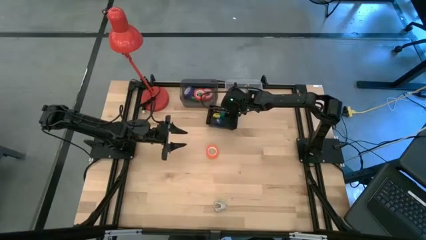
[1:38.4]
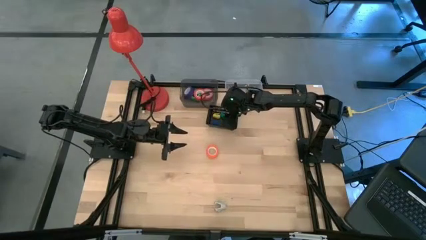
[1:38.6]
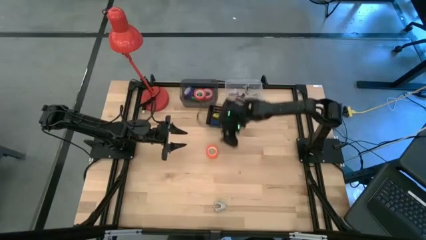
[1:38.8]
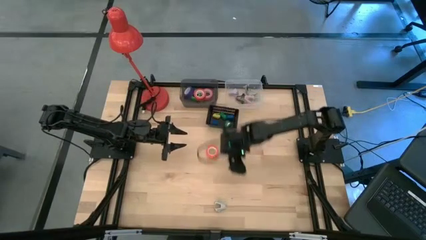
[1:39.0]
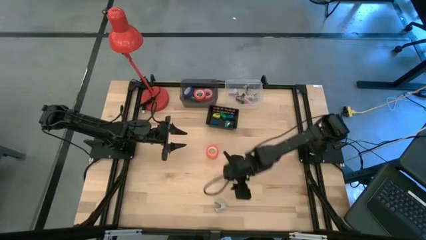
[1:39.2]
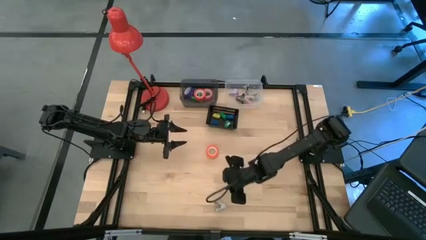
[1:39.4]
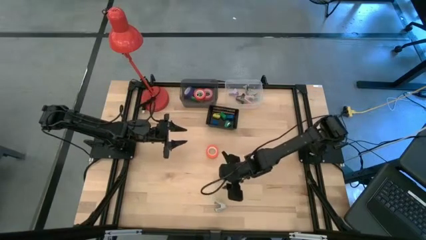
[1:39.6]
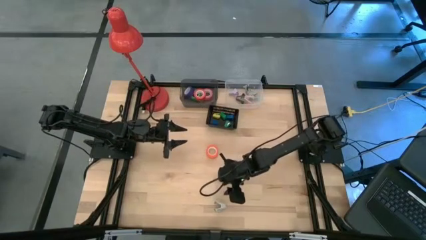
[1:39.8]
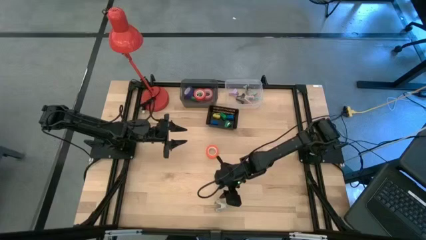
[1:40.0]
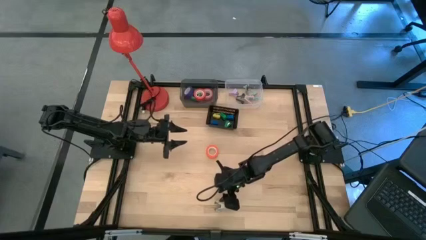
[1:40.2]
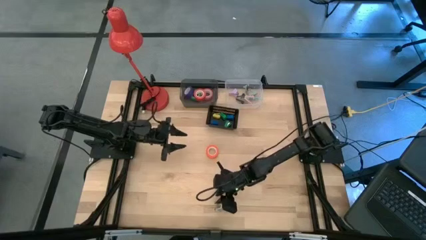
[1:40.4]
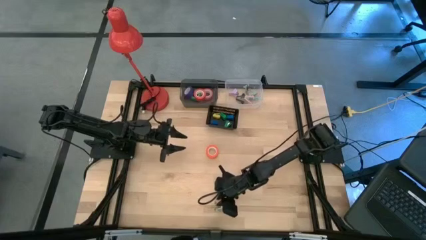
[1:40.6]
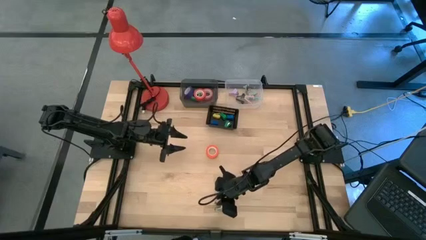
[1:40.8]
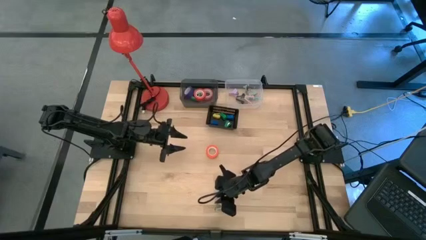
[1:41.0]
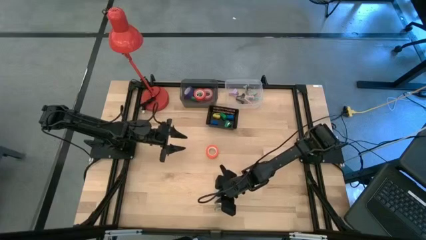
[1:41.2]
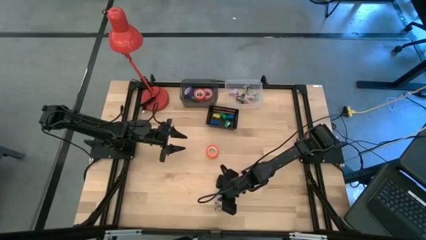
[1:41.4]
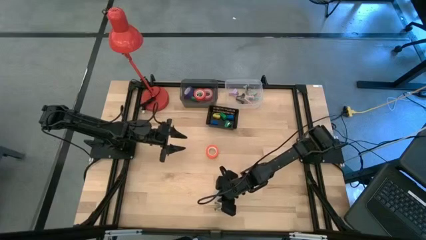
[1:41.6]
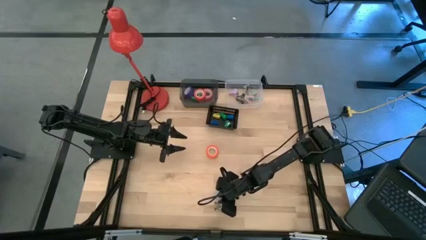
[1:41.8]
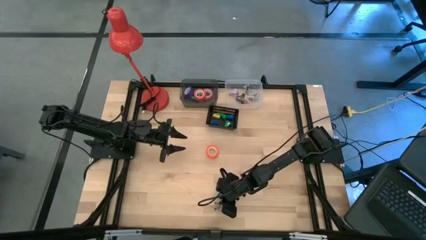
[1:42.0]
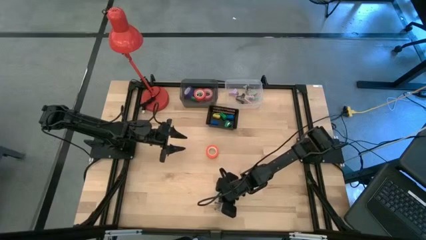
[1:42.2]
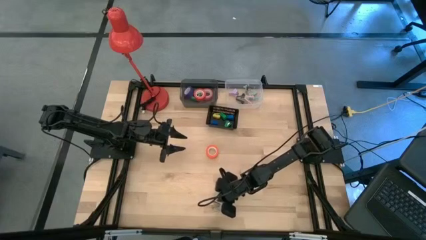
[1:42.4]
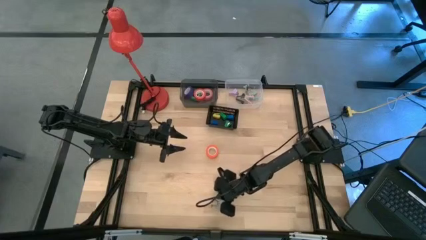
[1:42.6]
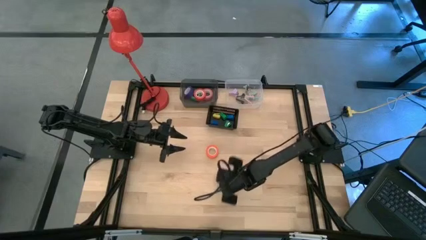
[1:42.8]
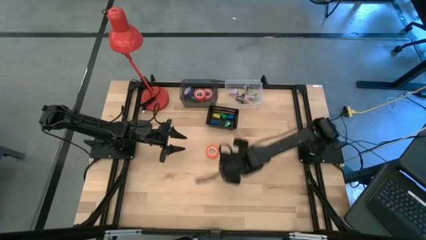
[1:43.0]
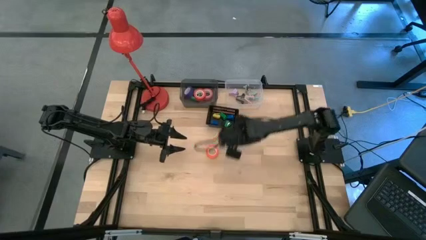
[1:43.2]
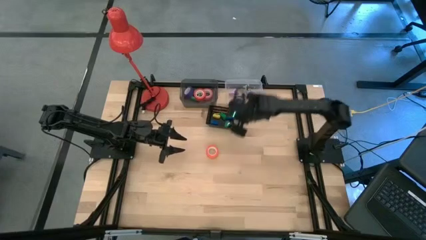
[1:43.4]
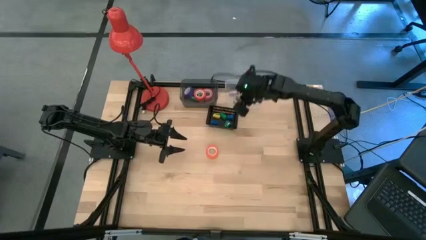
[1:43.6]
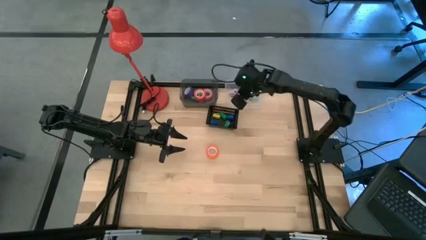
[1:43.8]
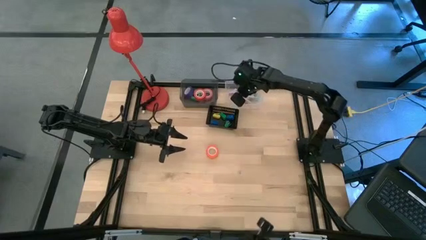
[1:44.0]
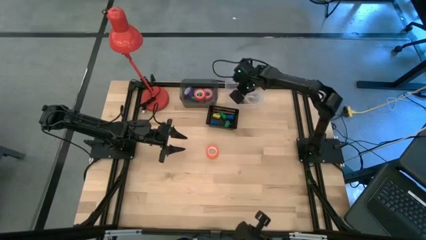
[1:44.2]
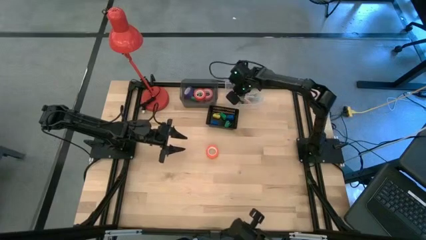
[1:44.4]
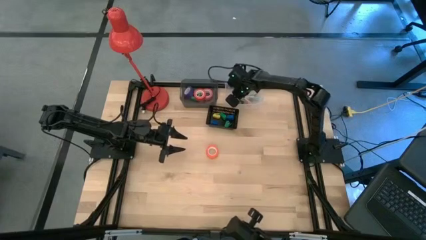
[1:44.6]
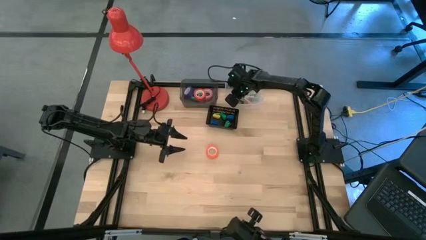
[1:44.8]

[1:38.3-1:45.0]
Task: Pick and place Stapler, Stapler remover, tape
Put the gray staple remover into the transparent bin

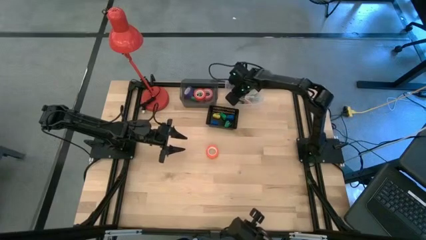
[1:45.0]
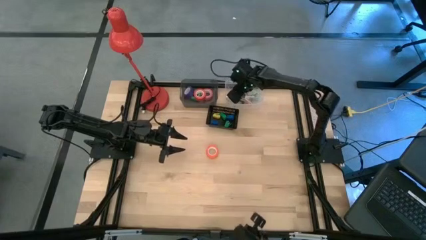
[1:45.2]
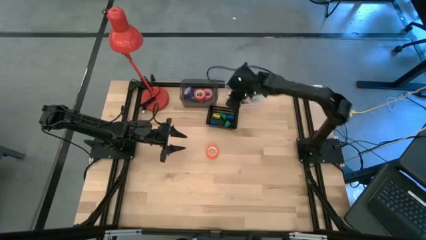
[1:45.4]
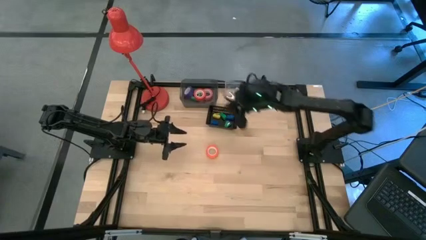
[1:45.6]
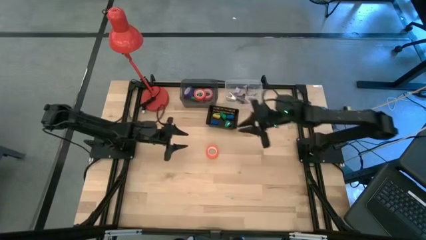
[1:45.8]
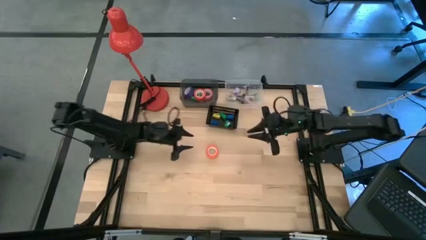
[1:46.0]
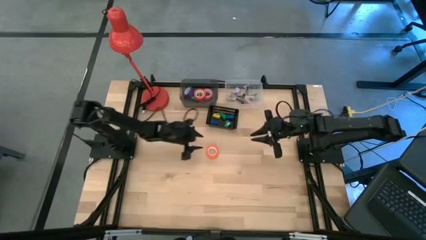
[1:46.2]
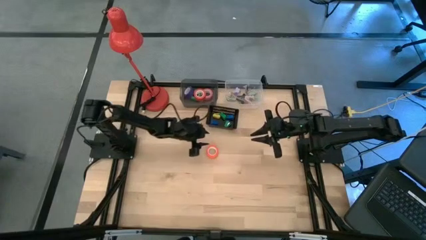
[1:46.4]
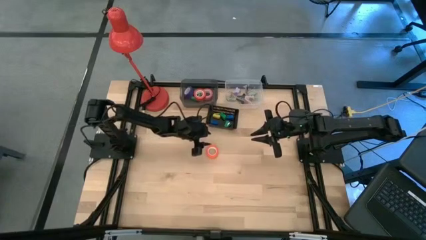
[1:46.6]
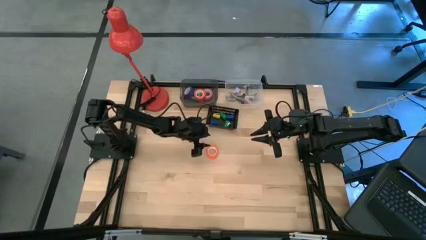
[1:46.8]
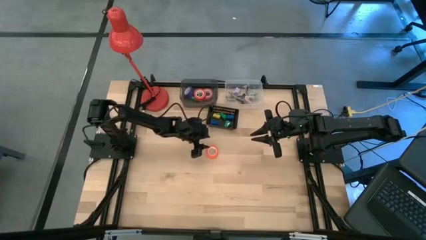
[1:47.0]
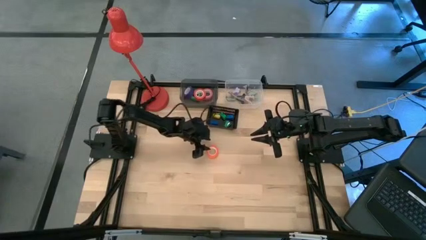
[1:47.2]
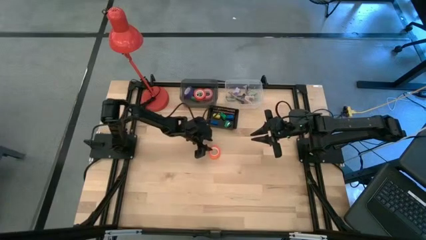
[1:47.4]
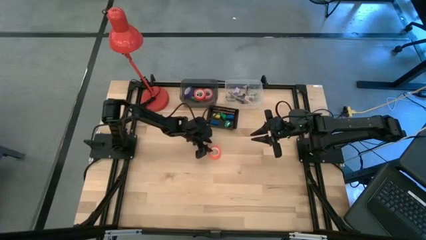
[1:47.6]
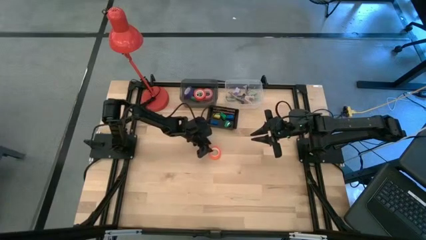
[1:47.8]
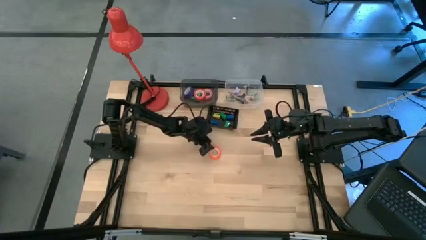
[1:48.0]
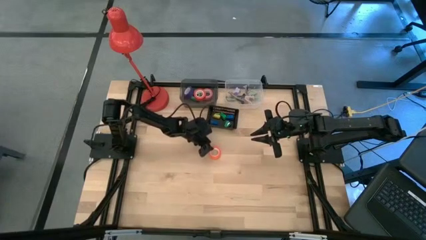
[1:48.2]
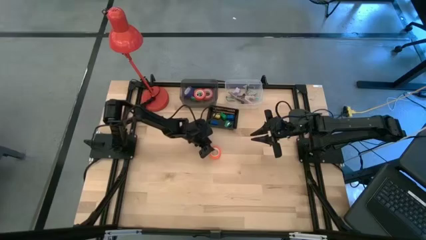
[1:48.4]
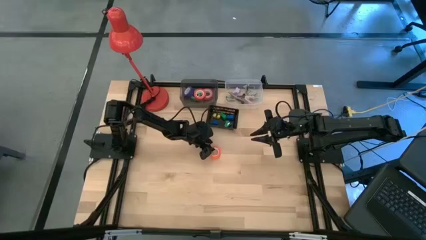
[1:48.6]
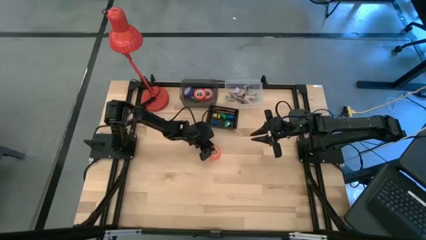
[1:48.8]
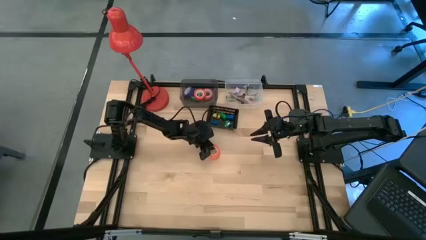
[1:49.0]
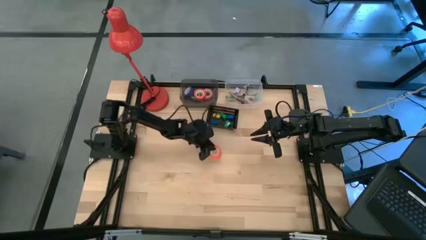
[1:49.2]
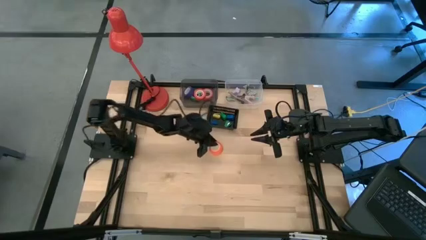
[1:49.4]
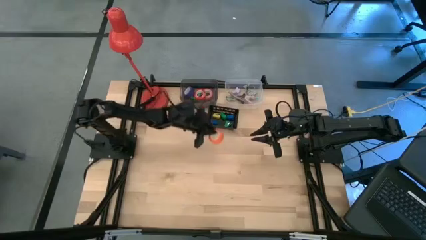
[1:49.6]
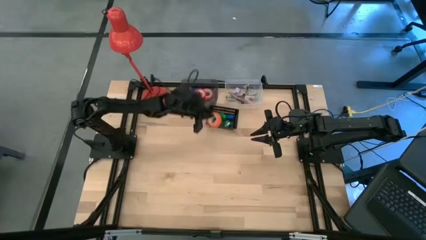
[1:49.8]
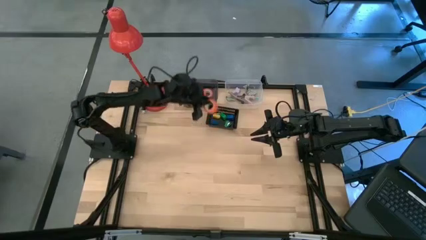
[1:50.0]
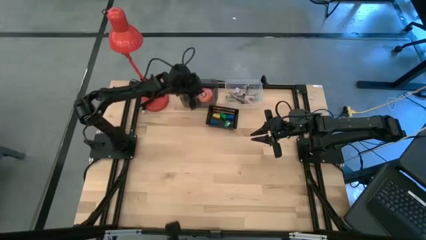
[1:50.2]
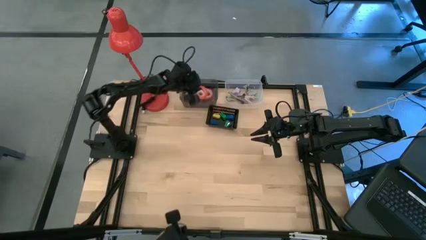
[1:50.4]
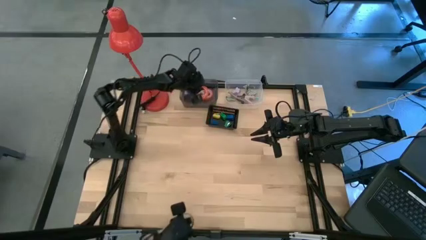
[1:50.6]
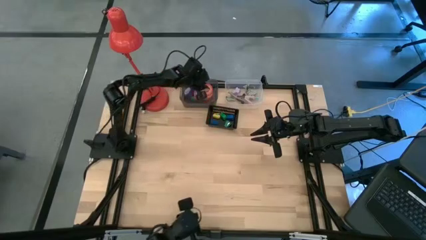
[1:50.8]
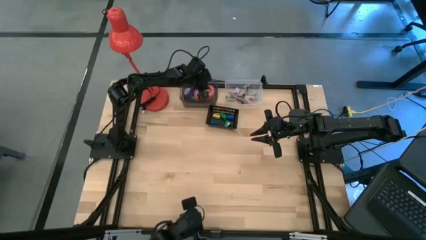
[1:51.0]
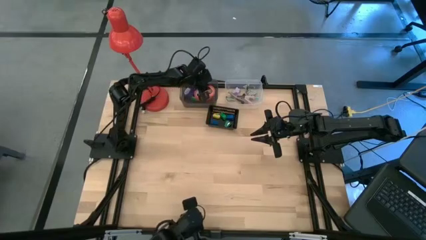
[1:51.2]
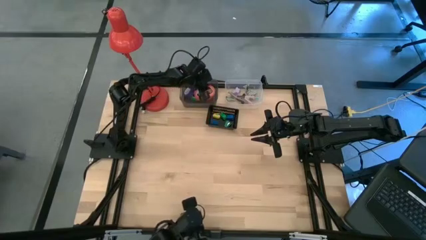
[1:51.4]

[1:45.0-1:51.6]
Put the orange tape into the black transparent bin

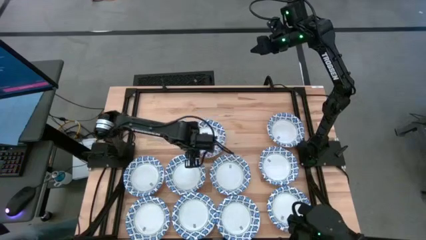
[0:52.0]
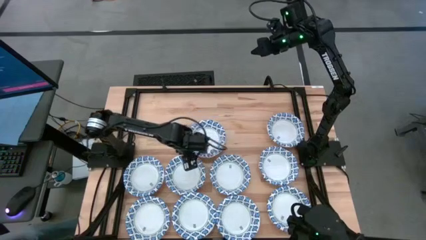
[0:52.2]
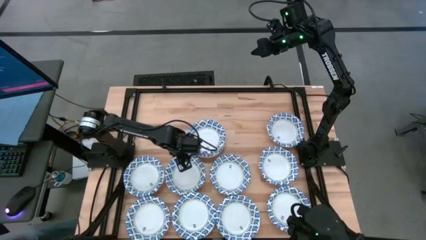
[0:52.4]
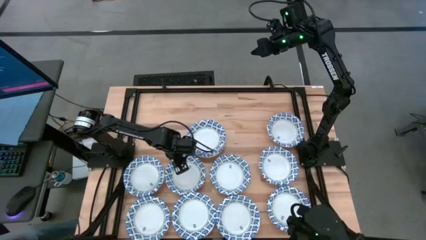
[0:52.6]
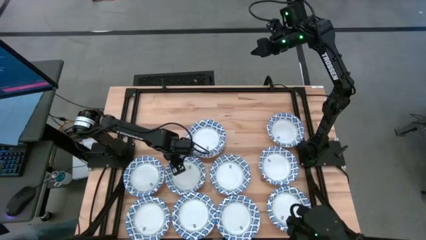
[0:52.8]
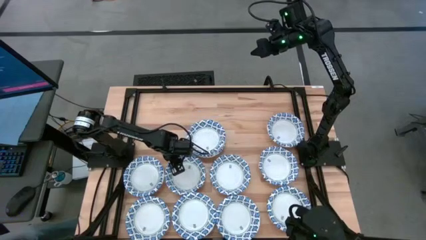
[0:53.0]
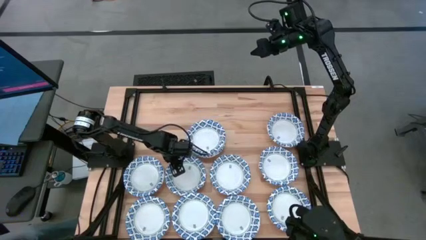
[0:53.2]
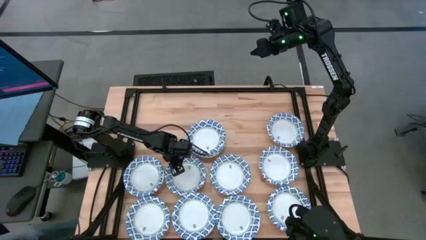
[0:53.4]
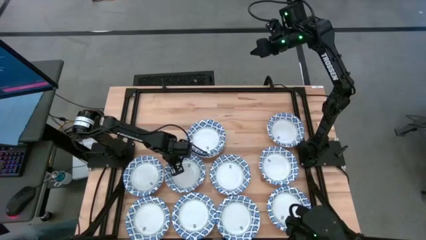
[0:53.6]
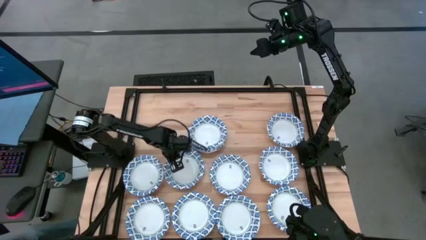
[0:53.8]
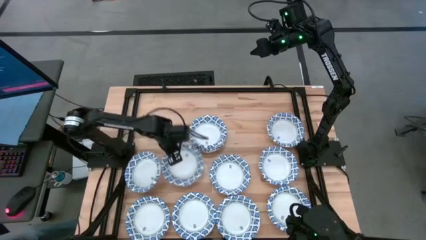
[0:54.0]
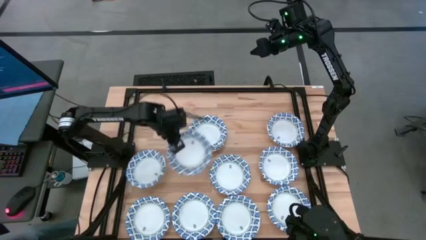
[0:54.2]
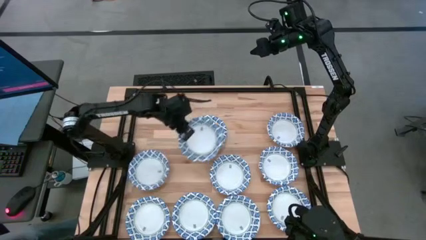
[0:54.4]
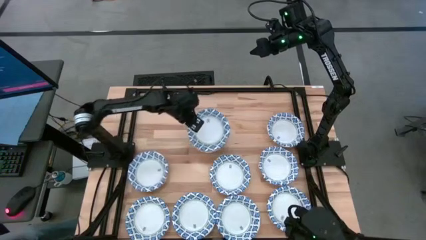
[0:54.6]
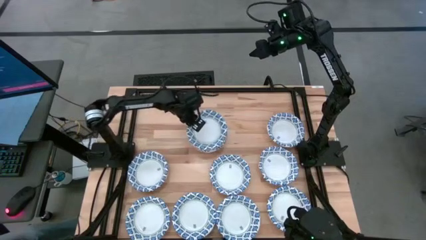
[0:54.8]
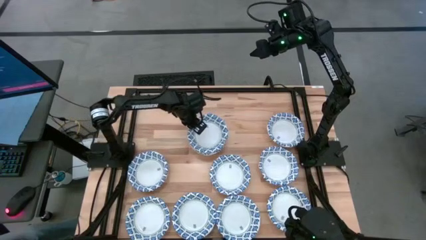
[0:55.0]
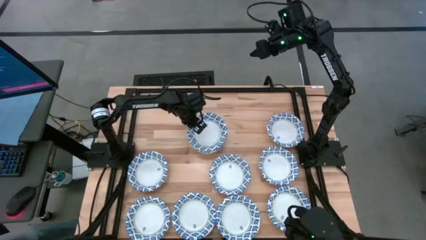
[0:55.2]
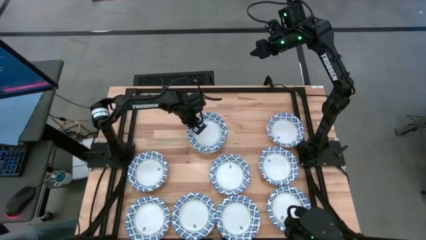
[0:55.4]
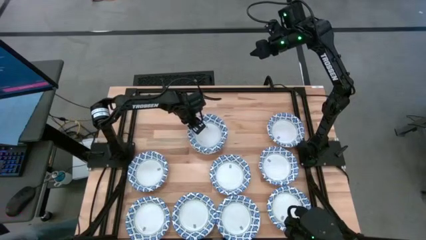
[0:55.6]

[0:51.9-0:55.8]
Task: Nest bowls inside each other
Stack the blue bowl on top of the blue bowls

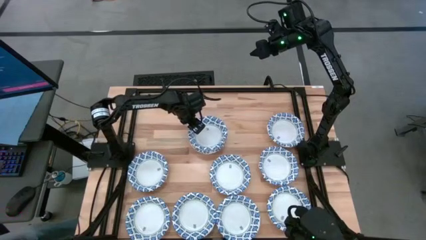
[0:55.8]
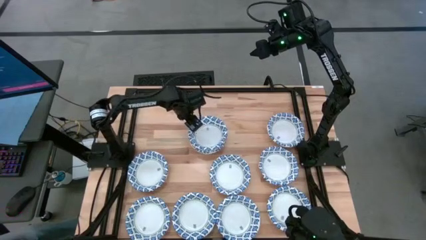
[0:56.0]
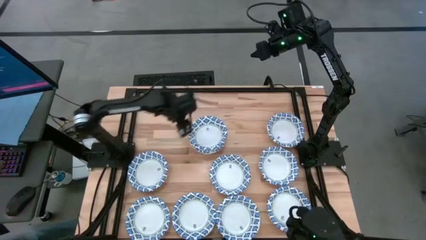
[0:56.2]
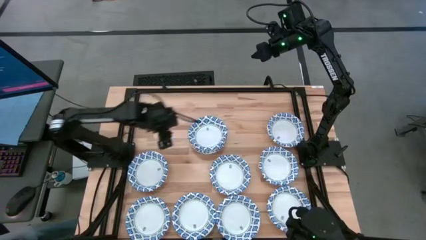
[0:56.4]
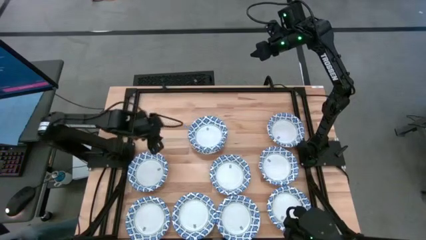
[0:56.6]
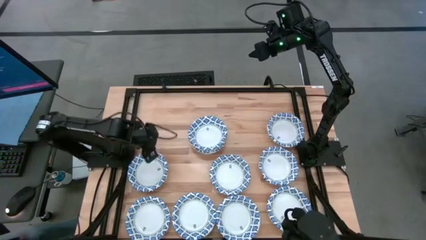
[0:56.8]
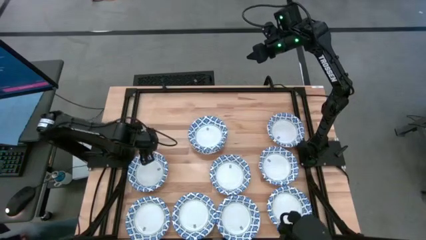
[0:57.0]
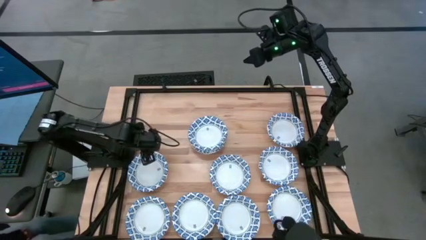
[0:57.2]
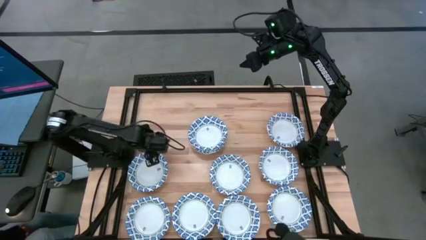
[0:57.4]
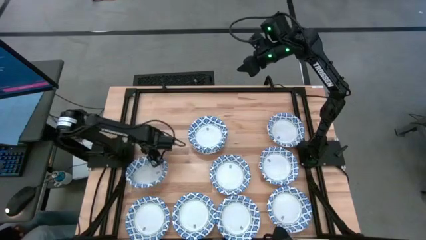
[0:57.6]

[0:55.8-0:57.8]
Stack the blue bowl on top of the blue bowls
